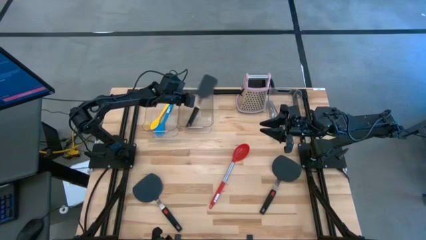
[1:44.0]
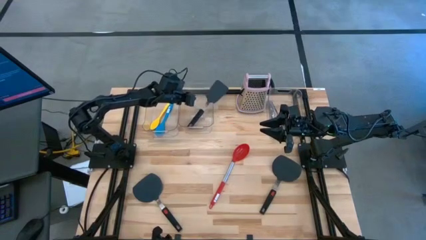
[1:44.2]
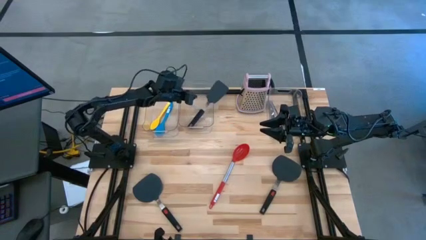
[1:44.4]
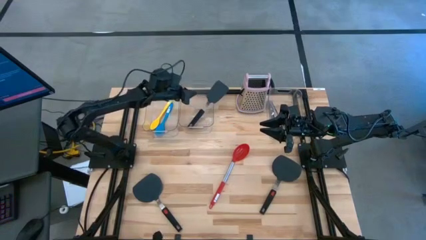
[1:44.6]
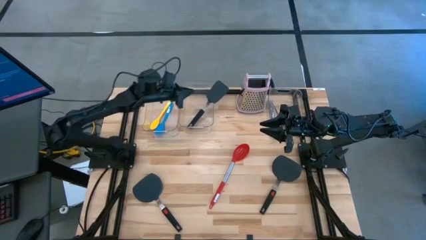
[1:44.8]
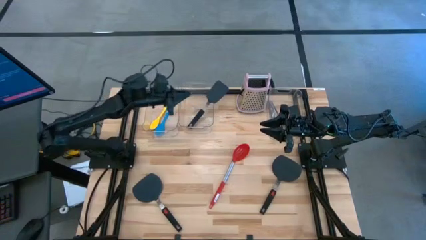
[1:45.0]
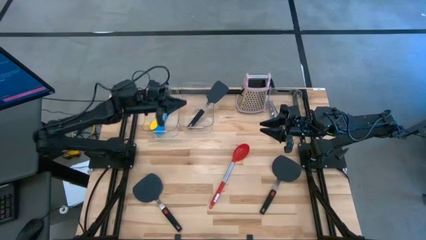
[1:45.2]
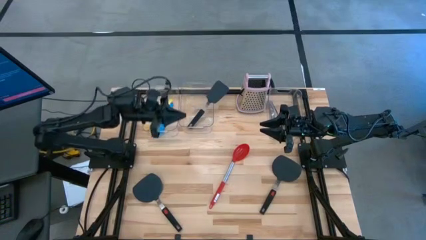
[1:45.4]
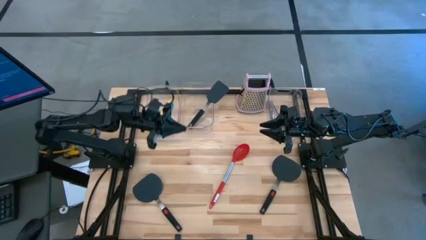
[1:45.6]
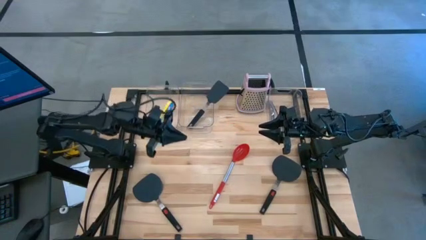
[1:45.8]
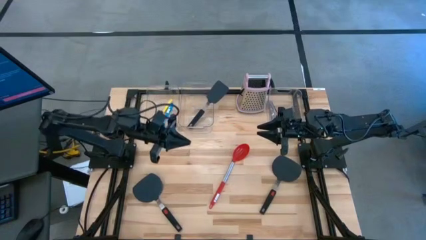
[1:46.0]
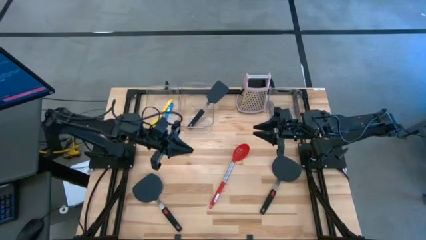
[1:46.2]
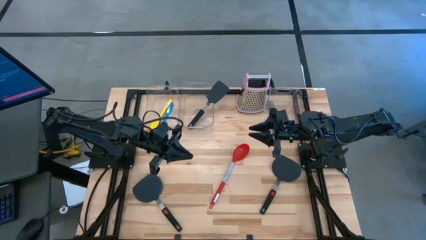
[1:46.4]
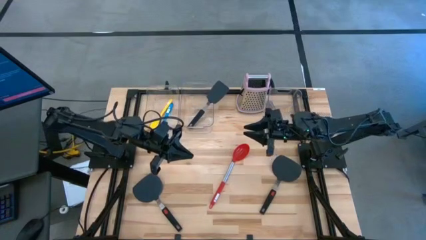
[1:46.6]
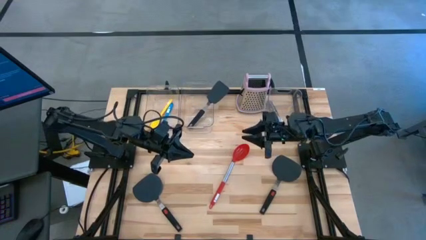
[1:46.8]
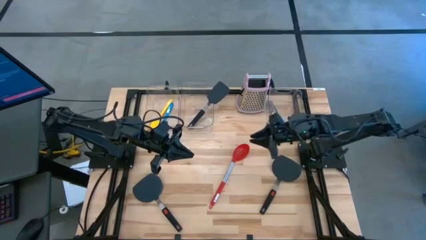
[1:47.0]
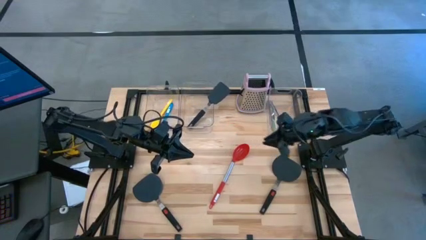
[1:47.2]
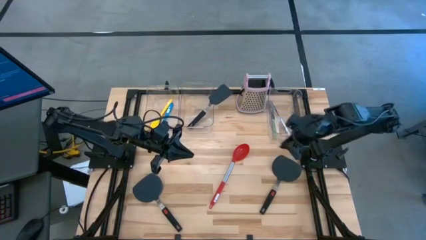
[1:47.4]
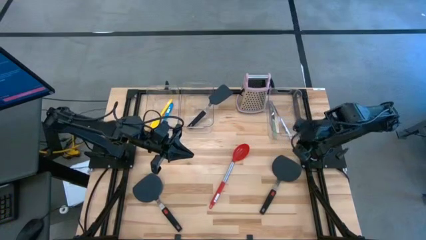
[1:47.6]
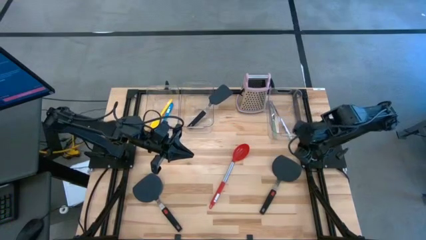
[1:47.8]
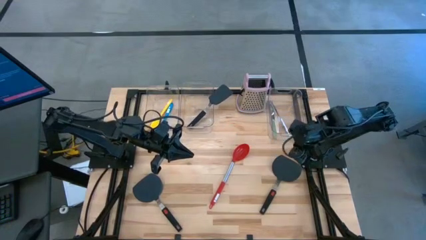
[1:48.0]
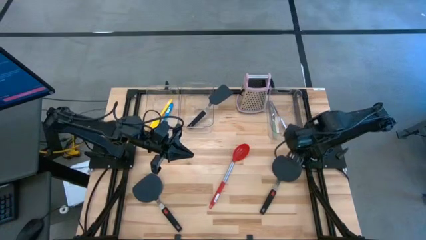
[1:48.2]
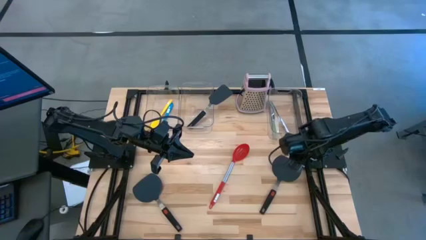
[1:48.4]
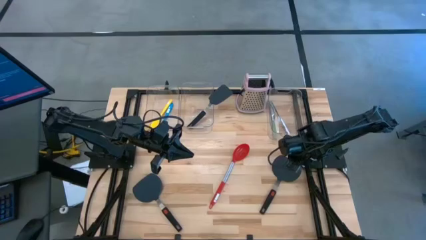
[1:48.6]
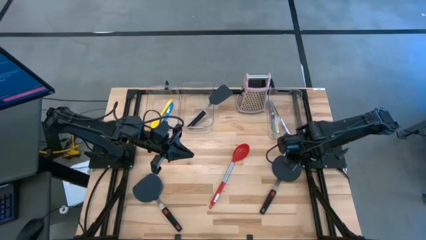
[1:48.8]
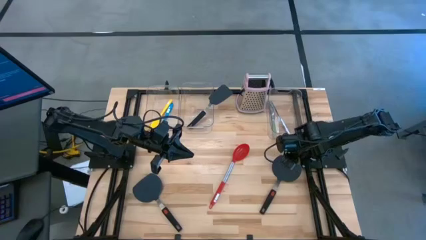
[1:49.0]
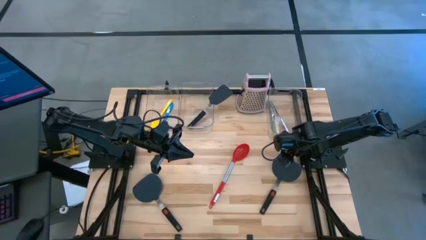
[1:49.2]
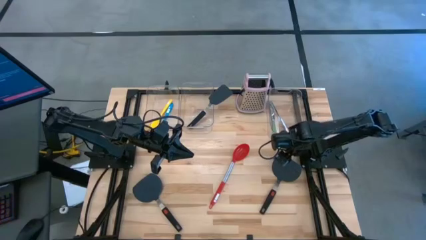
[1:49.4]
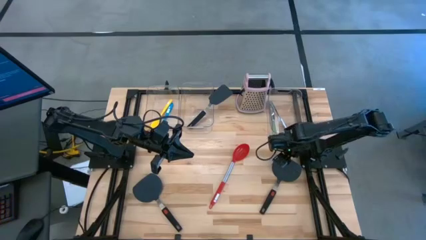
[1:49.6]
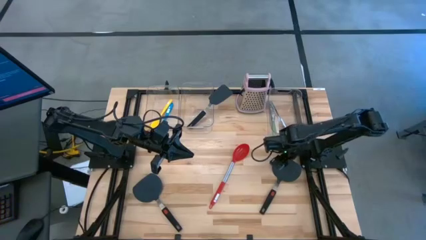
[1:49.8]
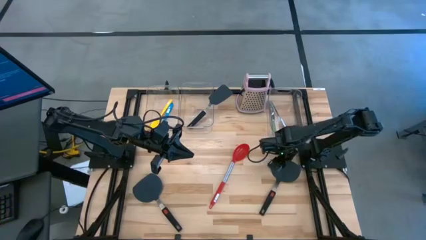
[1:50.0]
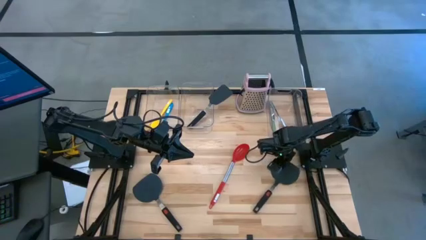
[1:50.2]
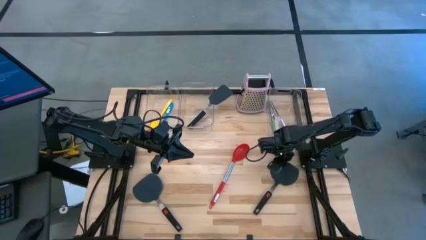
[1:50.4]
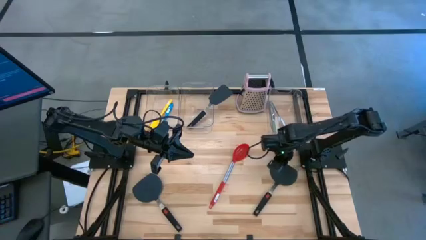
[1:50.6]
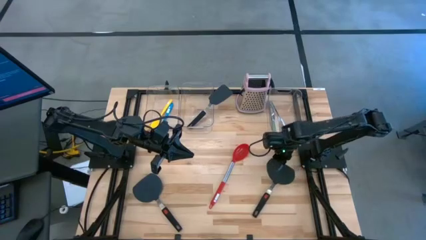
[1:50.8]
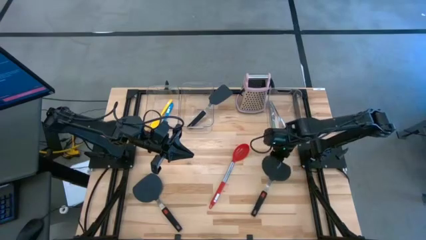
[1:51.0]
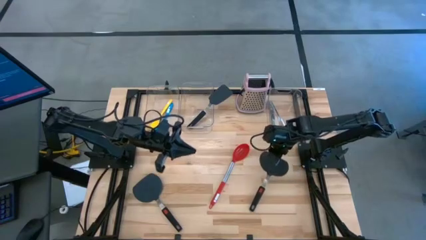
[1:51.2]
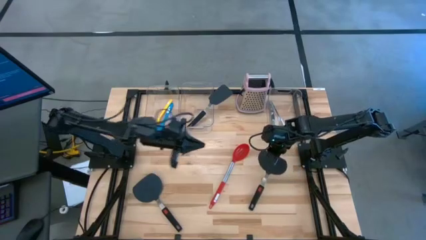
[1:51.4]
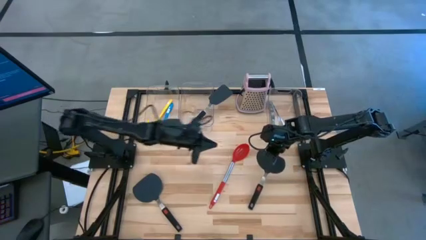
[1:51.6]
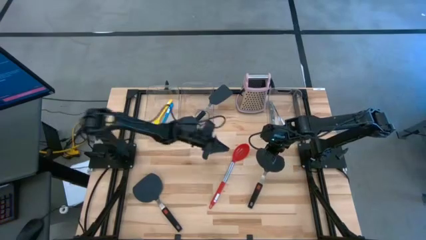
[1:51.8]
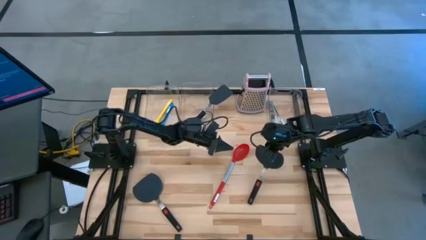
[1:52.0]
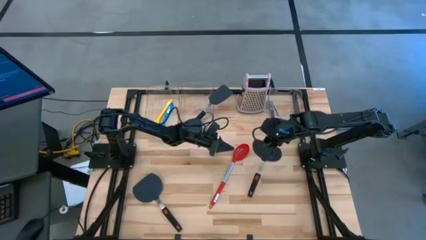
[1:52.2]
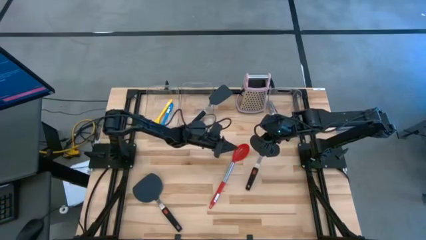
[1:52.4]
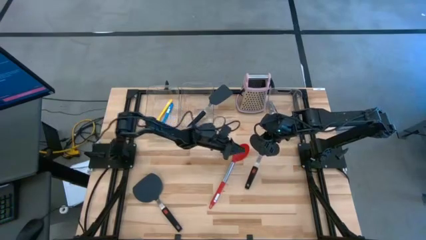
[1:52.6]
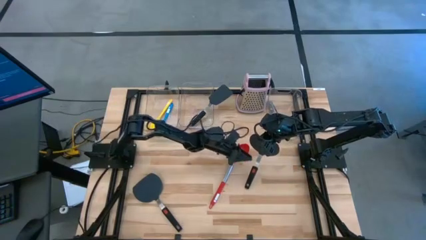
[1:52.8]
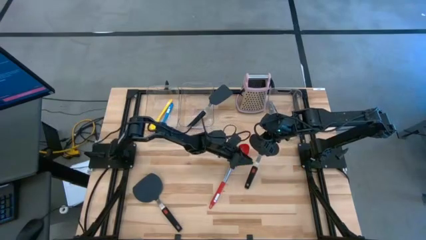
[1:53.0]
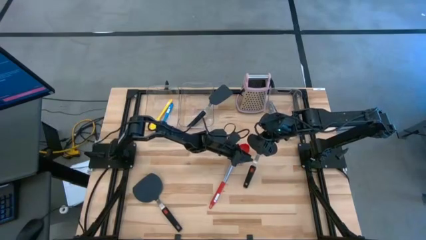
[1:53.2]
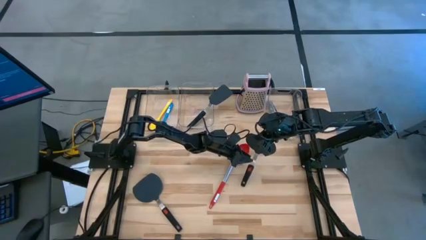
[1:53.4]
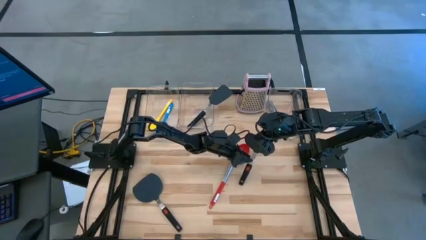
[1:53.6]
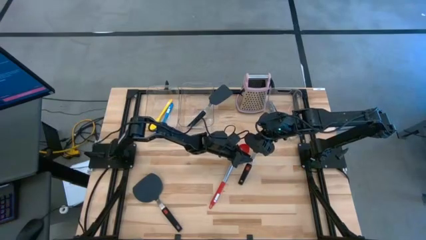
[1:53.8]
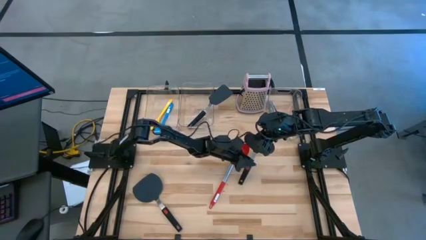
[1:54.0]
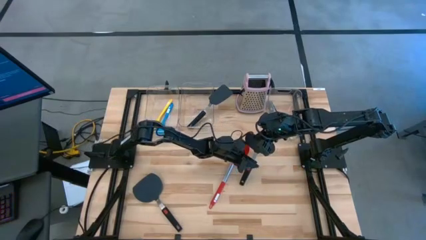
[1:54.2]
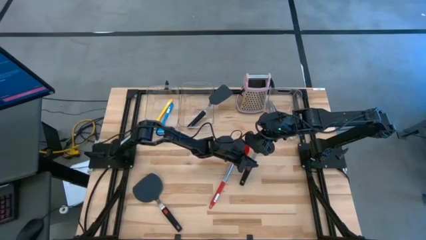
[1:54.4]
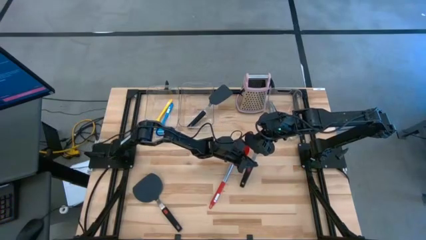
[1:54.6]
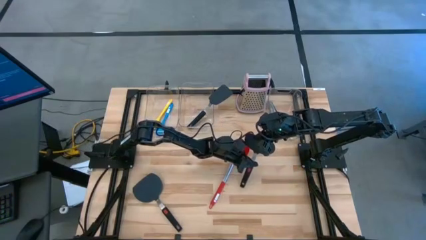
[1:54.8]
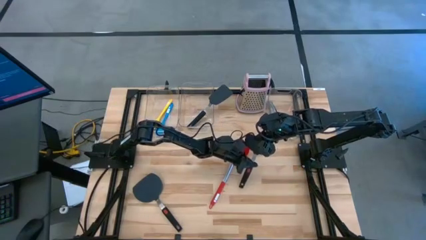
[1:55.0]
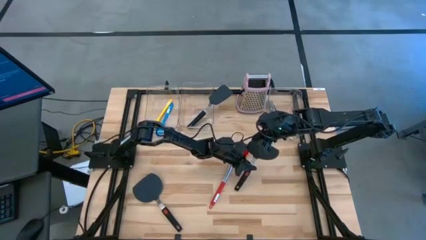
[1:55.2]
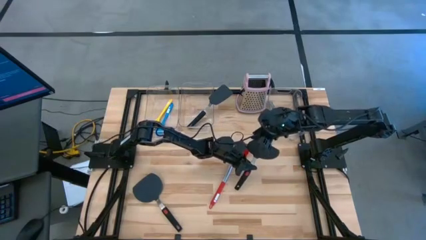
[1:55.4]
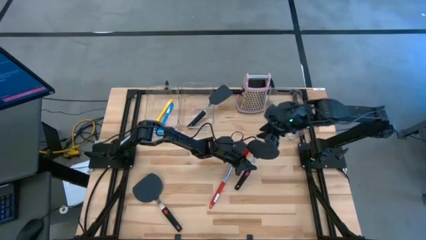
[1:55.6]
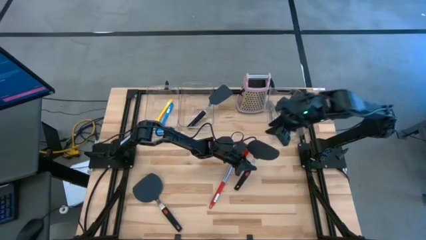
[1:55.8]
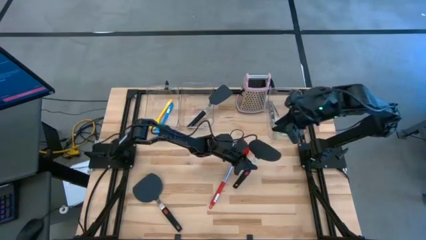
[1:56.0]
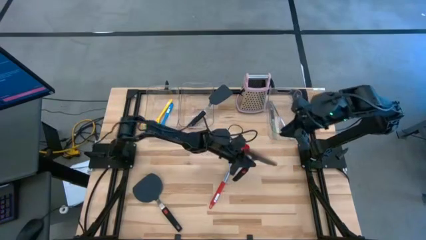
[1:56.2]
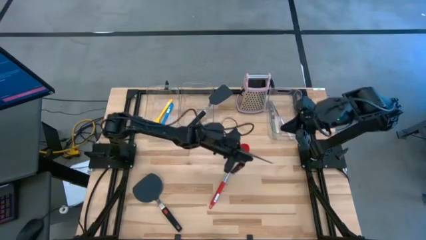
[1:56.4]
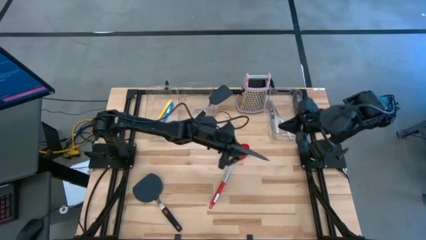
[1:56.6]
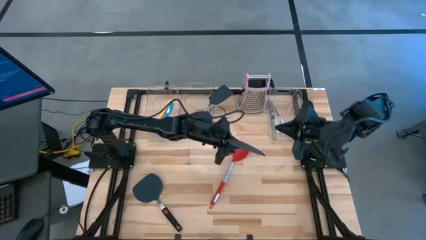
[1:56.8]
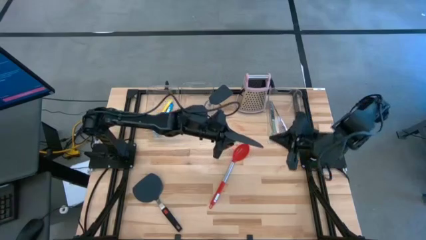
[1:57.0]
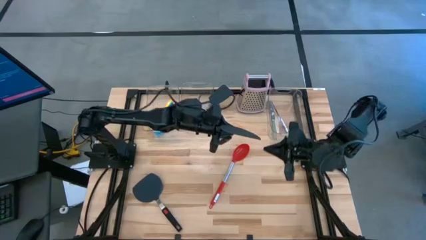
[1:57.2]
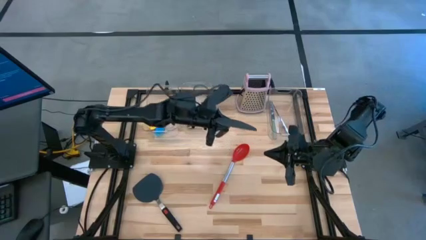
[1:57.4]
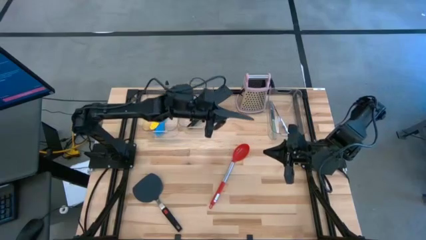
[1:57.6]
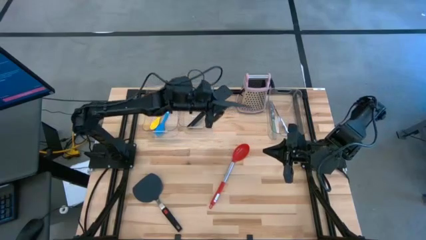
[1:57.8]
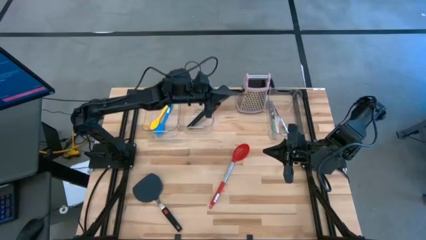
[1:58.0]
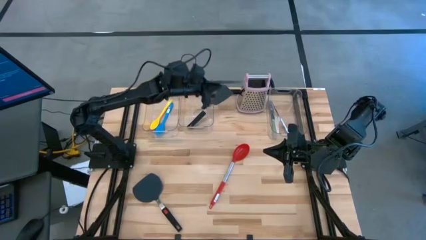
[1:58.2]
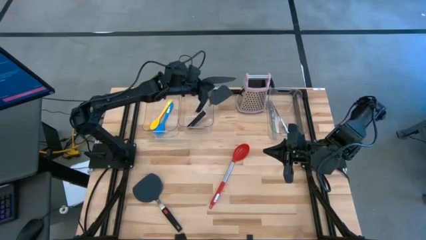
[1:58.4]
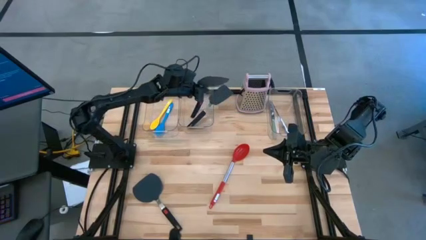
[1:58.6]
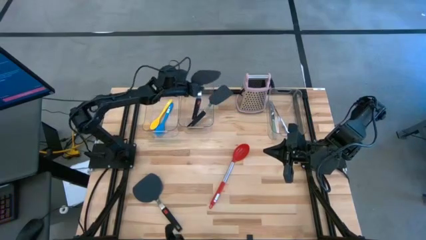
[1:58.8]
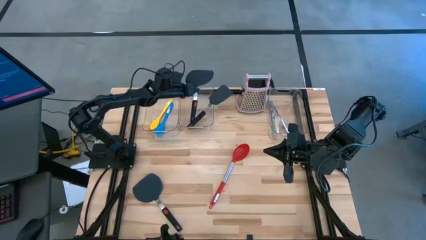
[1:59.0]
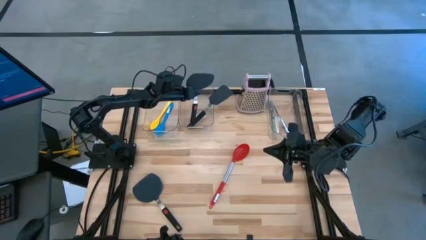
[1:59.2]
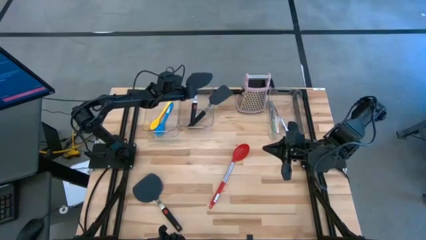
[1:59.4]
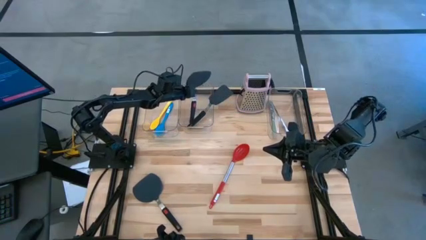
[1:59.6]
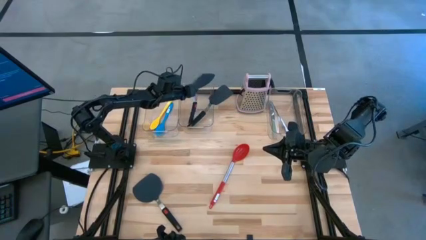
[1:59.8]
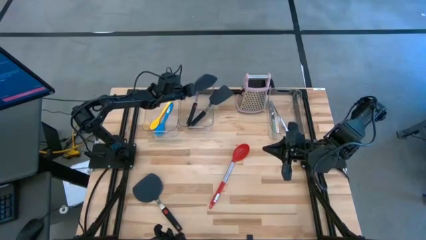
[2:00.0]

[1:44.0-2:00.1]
Task: Pick & Place Kitchen Items
Put the black spatula into the middle transparent bin
